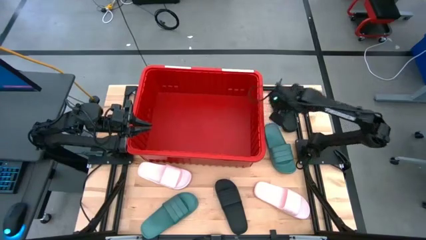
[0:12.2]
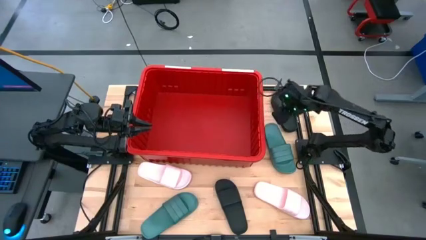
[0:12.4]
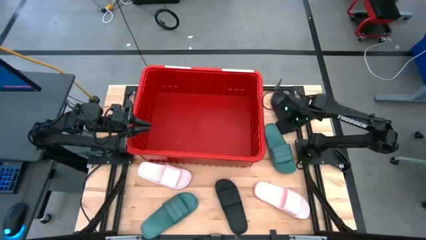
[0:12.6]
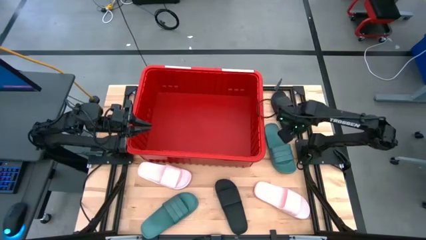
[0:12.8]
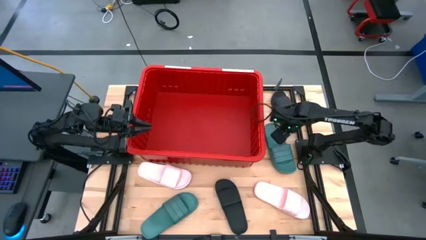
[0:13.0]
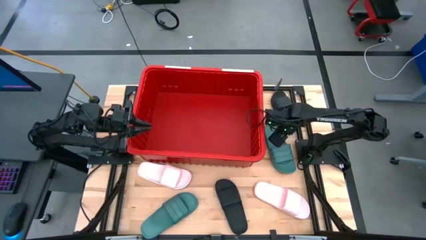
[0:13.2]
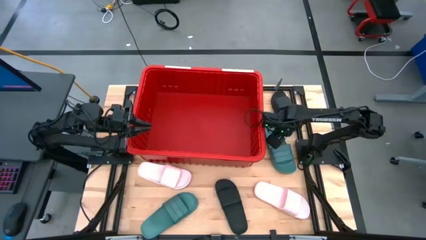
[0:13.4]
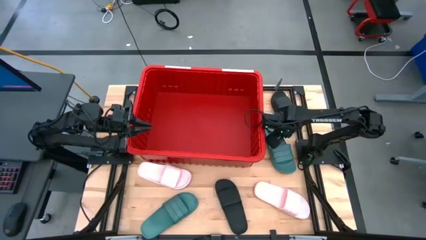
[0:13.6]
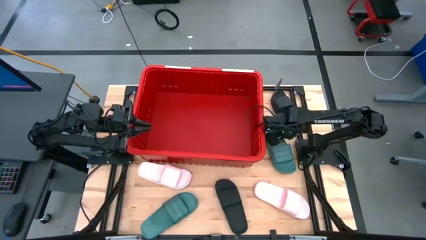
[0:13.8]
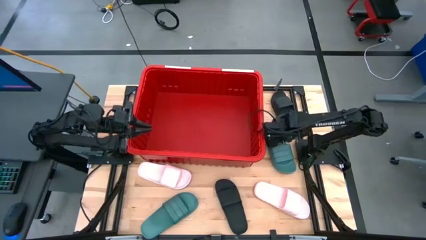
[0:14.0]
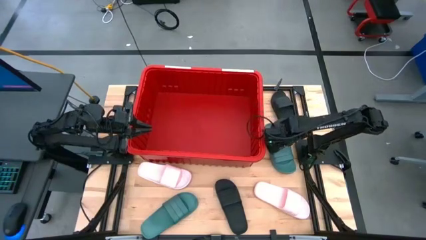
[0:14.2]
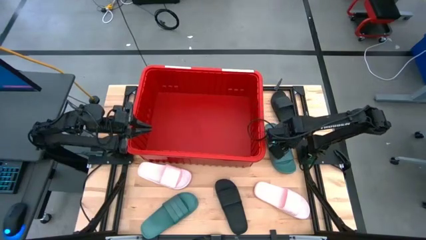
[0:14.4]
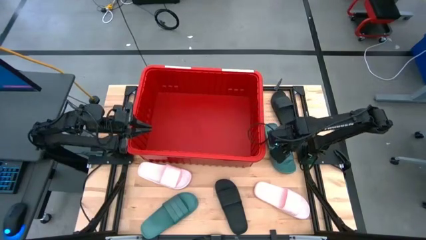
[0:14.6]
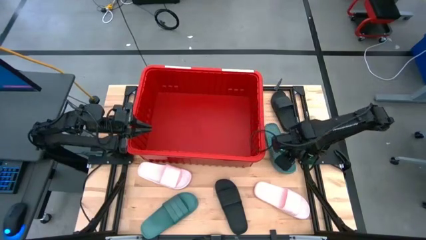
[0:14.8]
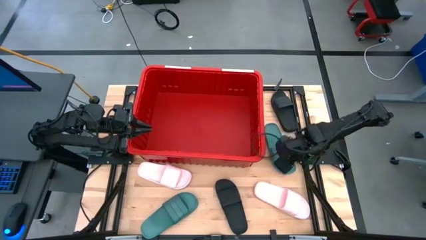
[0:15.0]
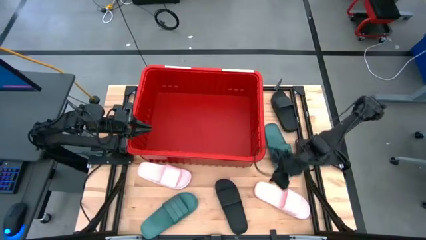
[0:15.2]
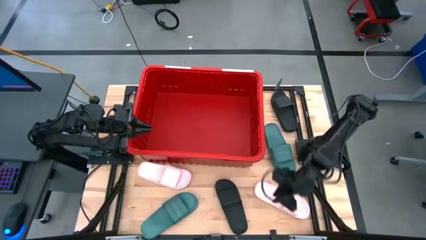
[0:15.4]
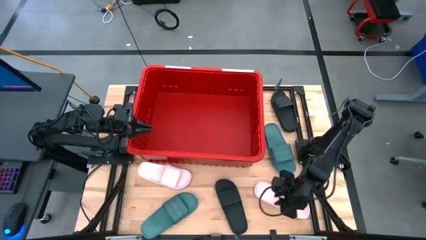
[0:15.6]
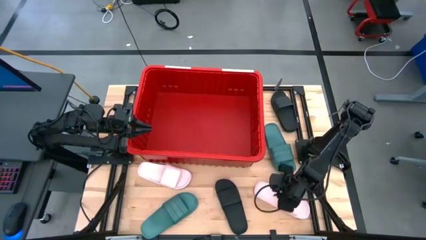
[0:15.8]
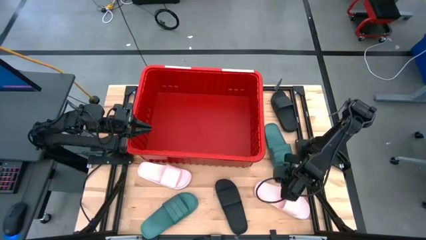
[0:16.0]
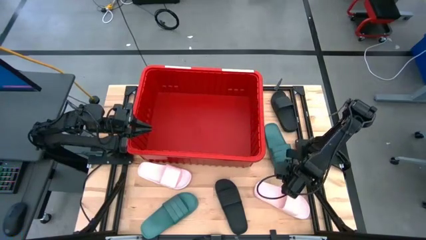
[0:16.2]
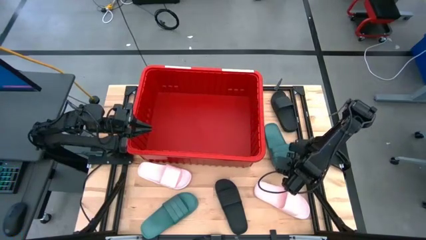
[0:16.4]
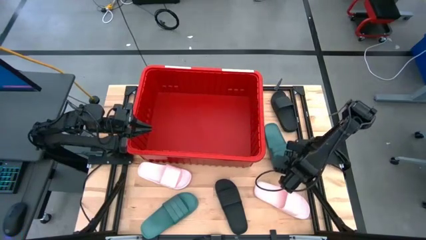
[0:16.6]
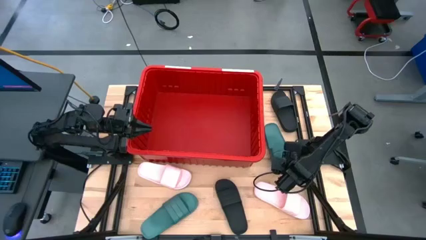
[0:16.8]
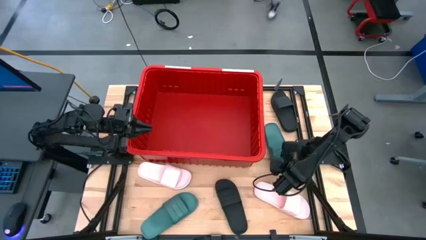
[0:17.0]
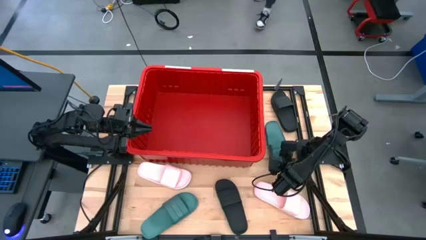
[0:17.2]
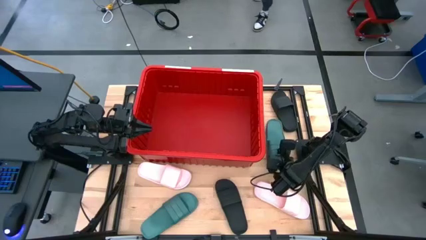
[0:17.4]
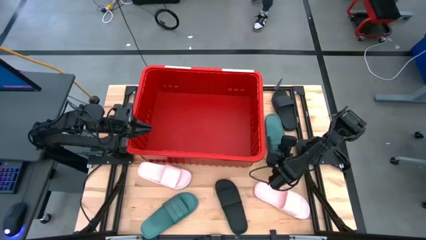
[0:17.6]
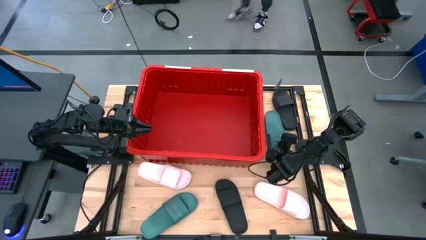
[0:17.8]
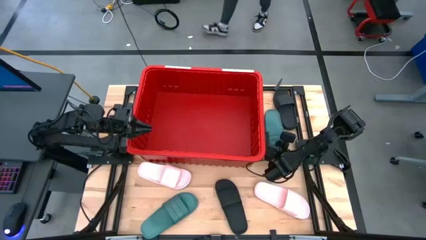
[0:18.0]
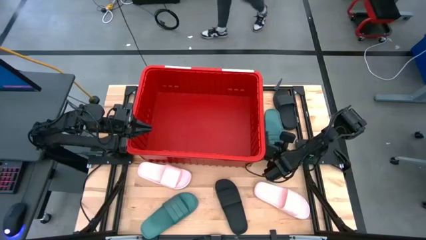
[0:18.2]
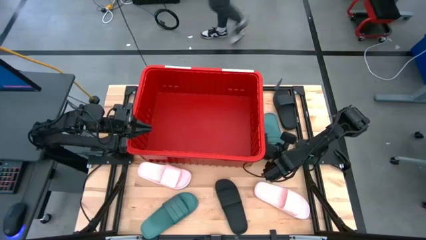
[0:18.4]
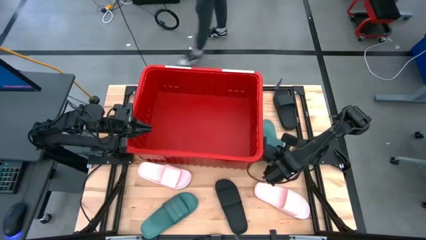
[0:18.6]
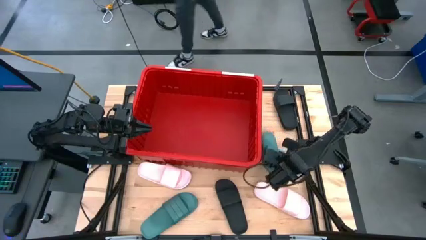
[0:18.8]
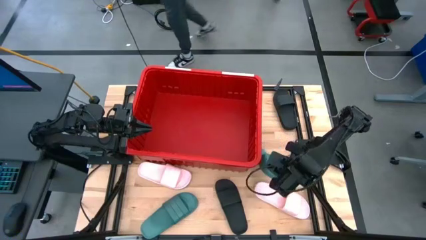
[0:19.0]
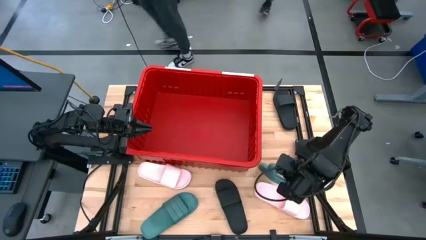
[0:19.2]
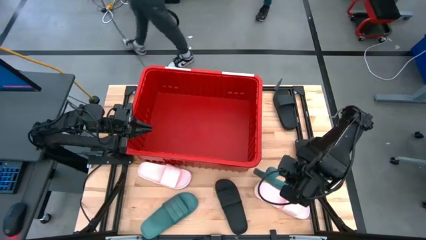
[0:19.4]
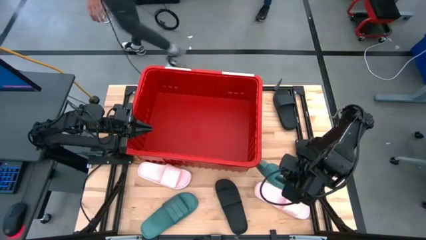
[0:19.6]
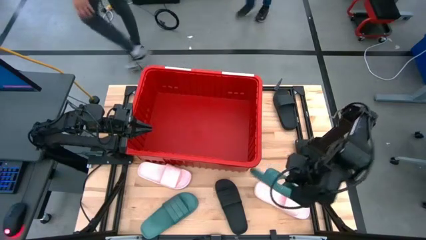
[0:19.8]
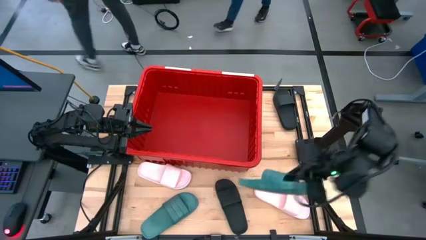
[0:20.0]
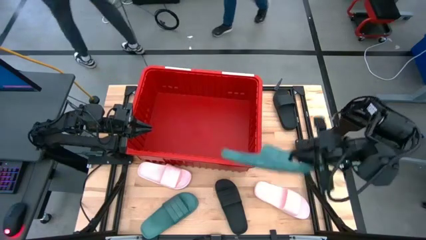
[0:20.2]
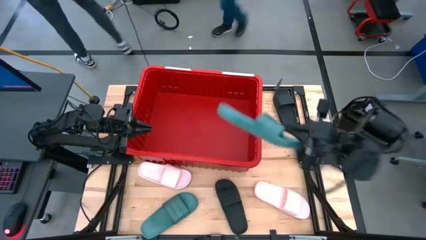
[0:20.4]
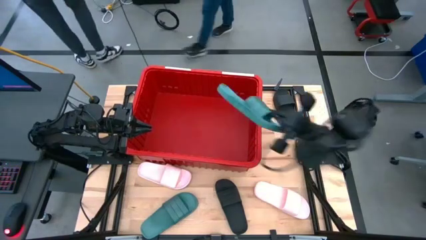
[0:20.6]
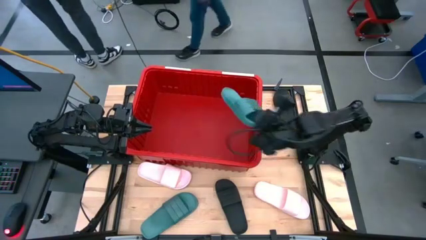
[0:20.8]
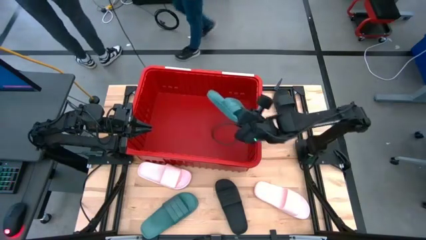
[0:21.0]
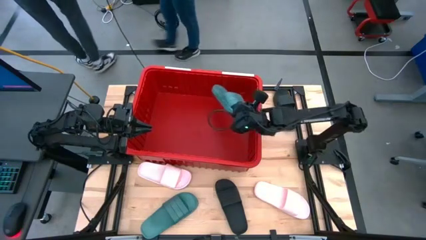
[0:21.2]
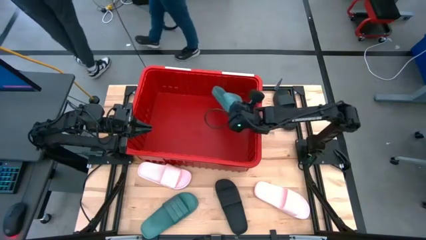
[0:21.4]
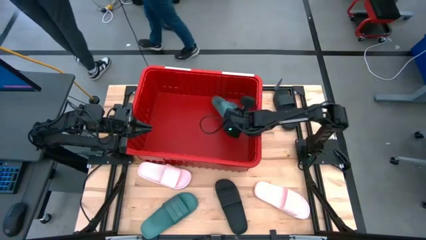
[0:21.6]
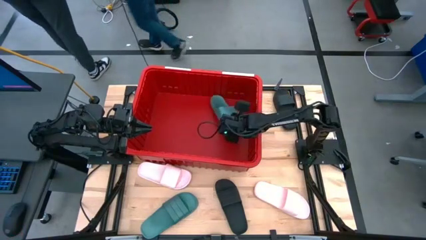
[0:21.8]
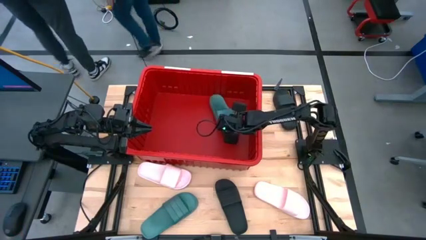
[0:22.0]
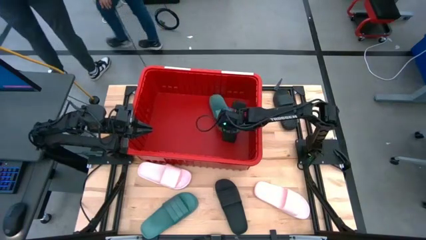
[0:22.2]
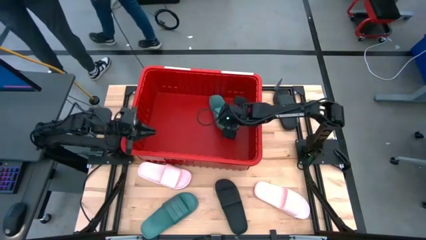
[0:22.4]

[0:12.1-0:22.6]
Task: Pick and place slides into bin
Put the top green slide into the red bin

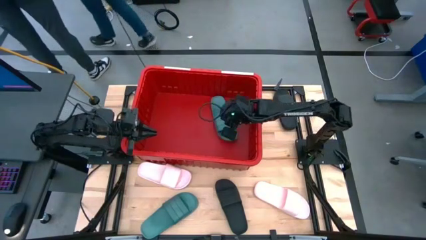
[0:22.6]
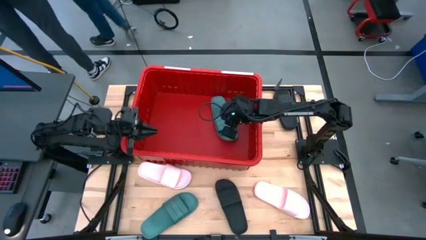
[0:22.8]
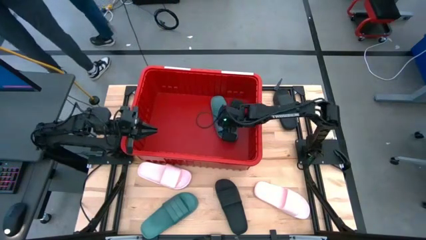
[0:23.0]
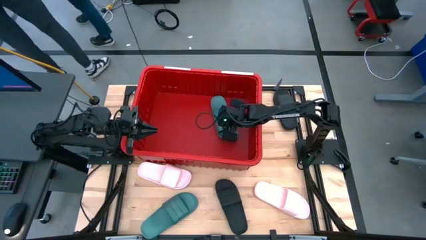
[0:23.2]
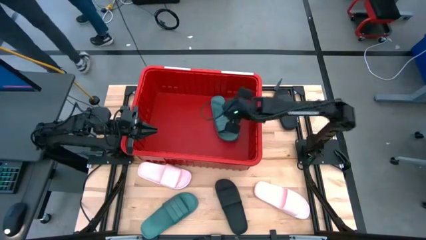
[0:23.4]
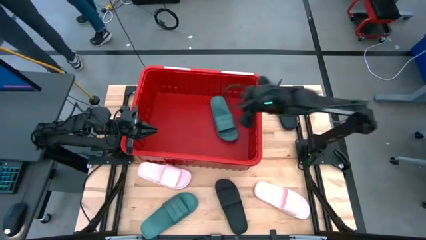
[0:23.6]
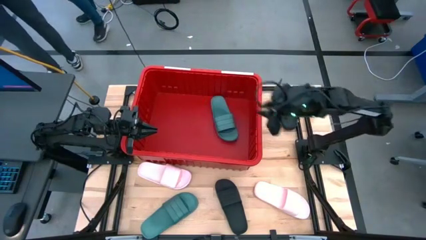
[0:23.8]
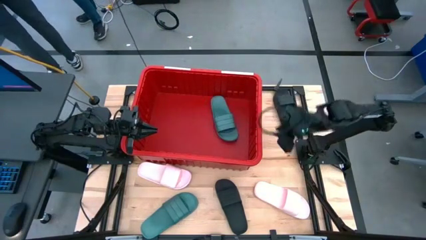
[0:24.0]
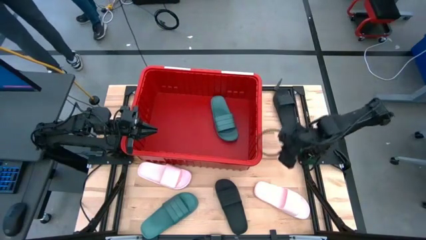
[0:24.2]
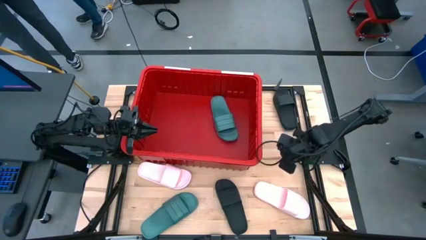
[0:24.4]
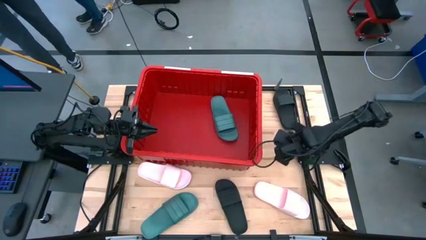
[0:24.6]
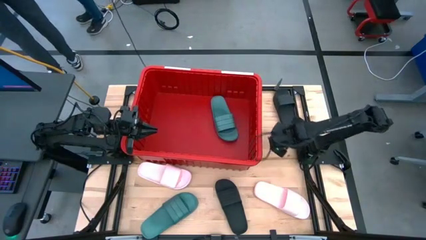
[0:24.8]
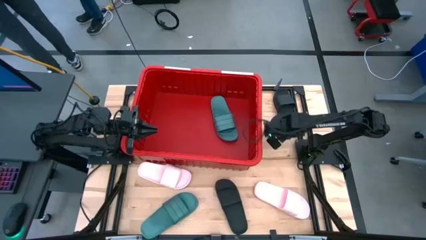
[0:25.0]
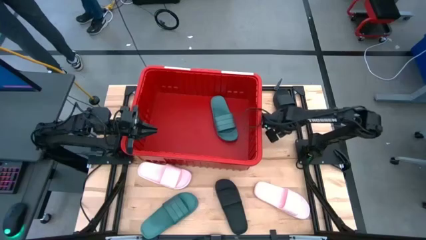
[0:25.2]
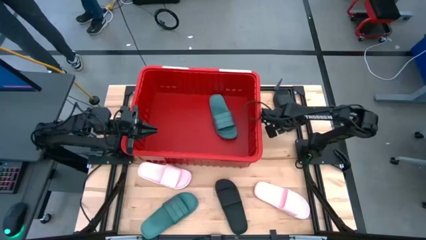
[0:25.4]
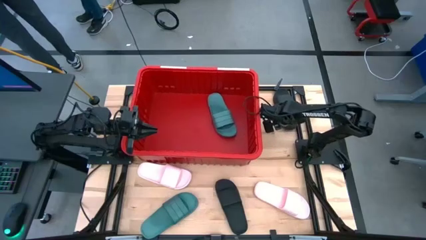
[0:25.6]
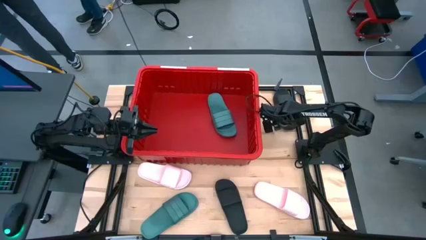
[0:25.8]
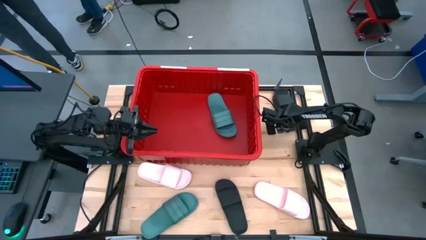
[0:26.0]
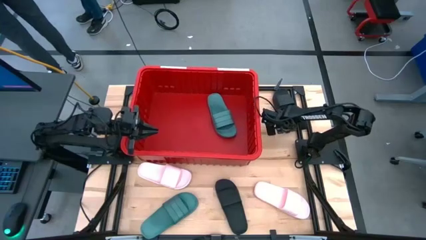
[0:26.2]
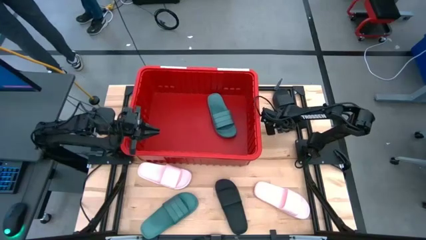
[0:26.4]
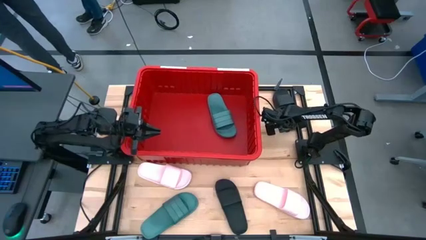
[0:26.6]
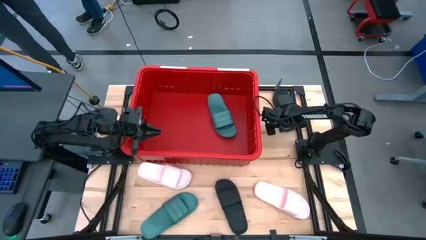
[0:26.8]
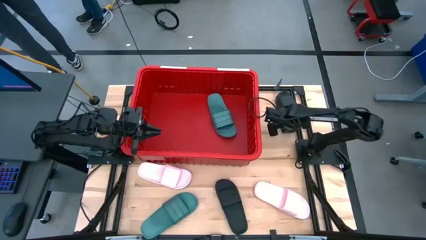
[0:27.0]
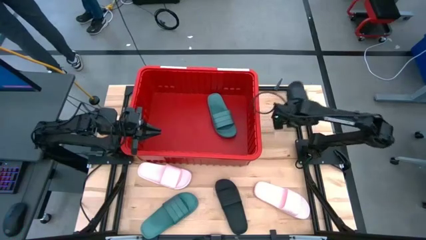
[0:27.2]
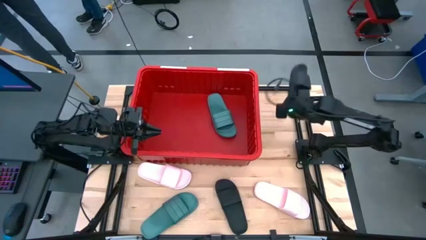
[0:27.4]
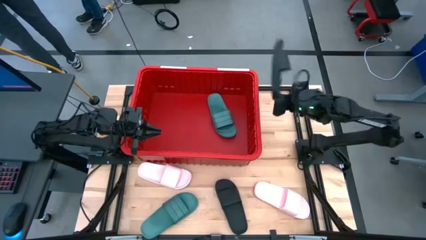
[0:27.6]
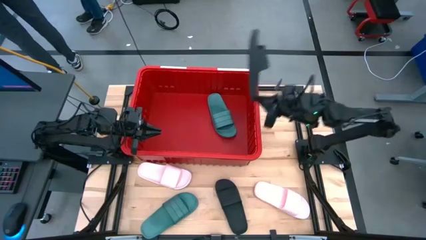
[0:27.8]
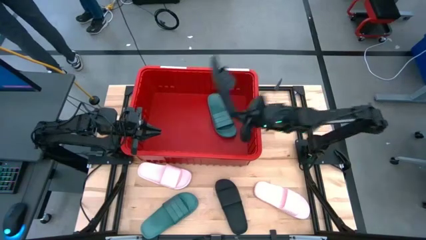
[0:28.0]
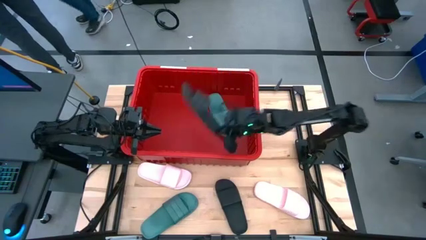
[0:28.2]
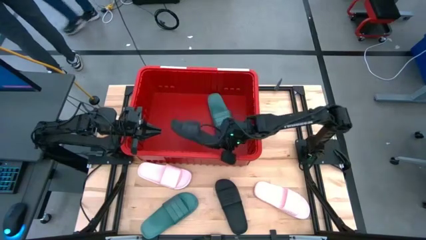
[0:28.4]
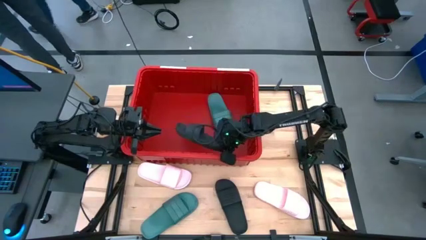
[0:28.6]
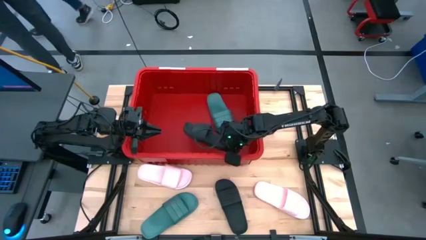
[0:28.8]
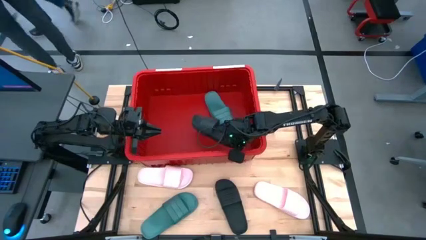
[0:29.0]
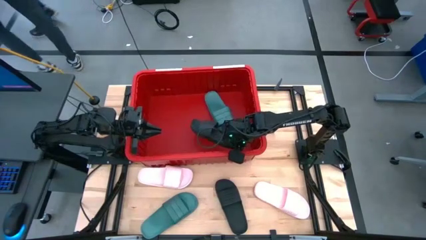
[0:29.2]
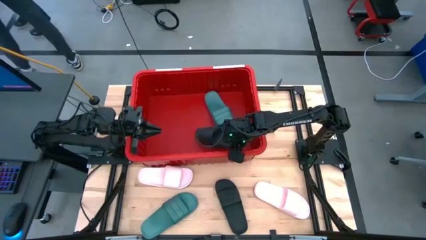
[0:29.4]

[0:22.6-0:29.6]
Put the top black slide into the red bin
